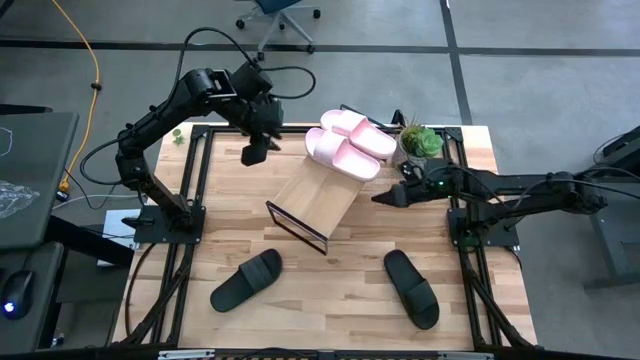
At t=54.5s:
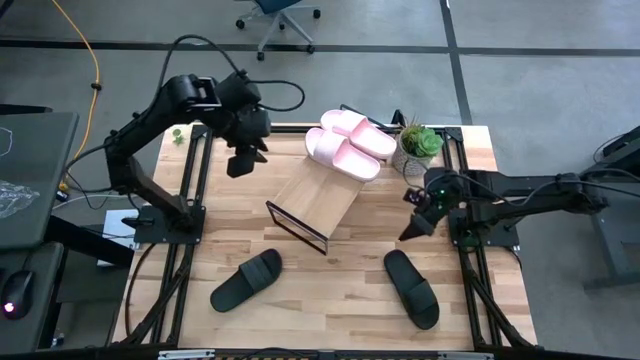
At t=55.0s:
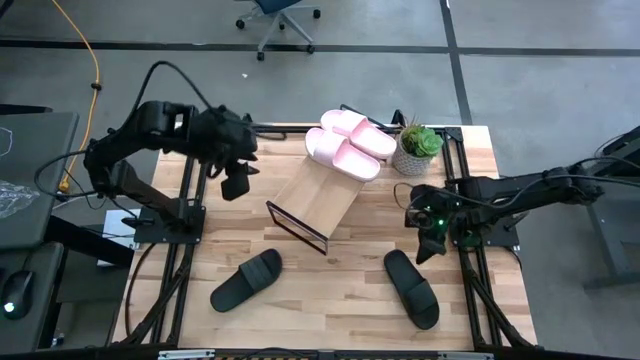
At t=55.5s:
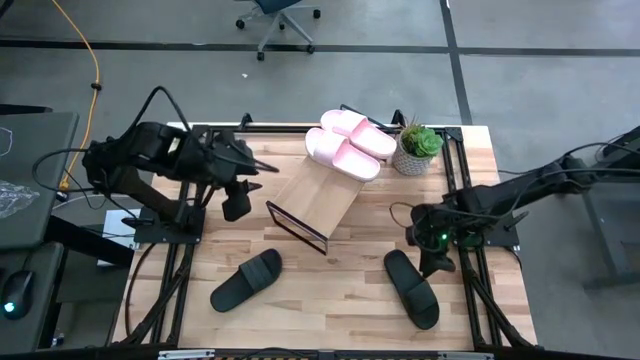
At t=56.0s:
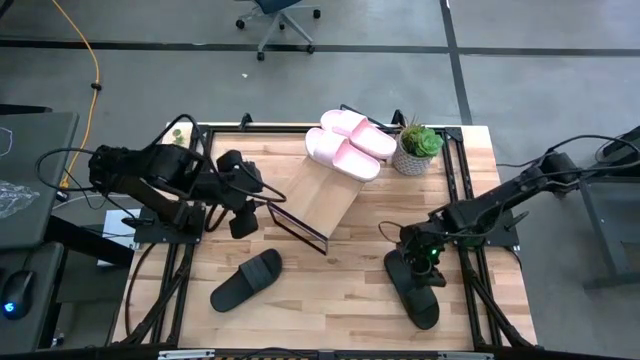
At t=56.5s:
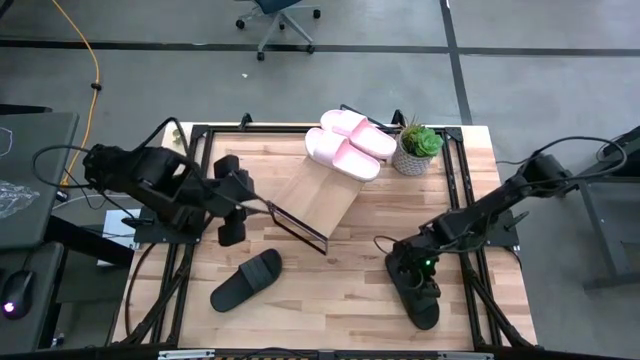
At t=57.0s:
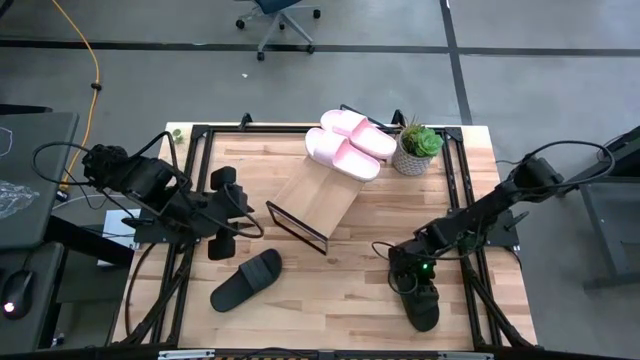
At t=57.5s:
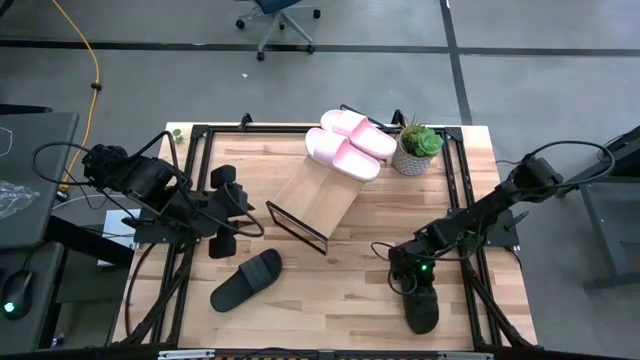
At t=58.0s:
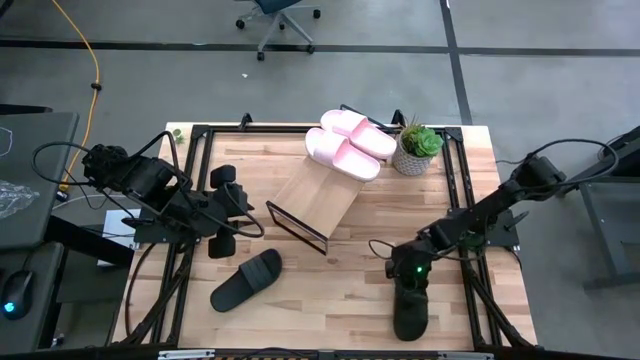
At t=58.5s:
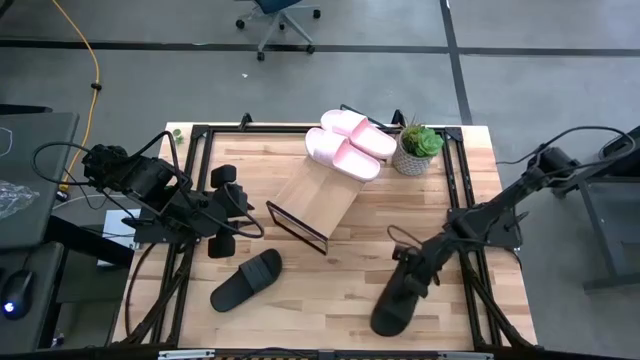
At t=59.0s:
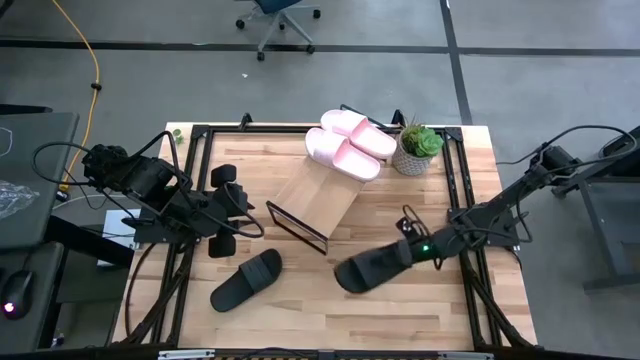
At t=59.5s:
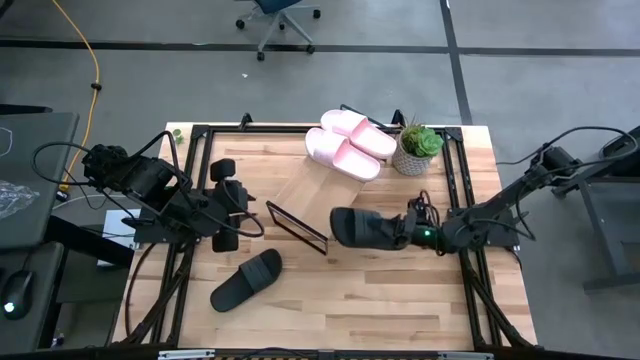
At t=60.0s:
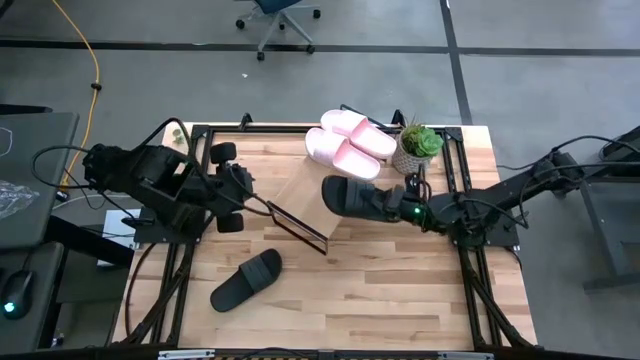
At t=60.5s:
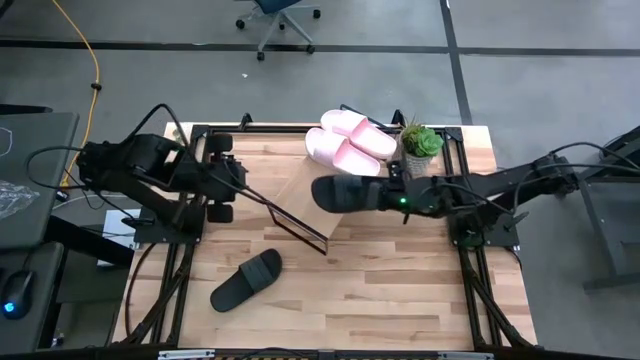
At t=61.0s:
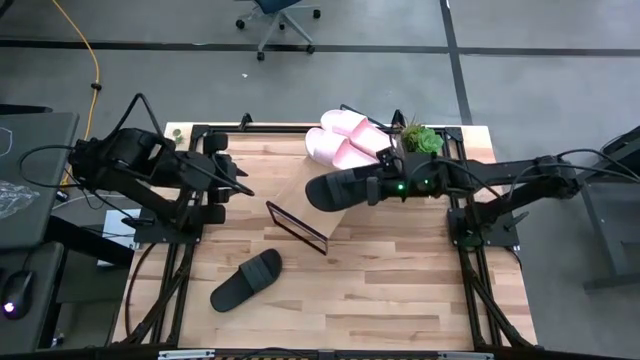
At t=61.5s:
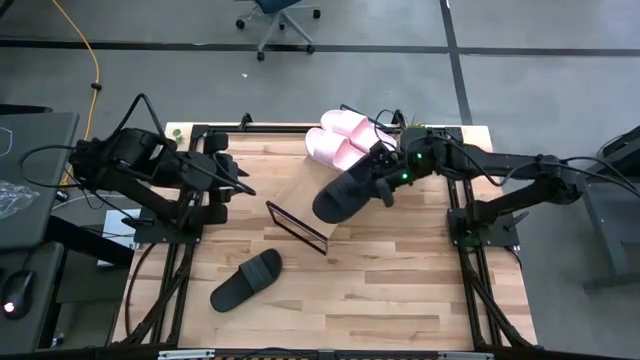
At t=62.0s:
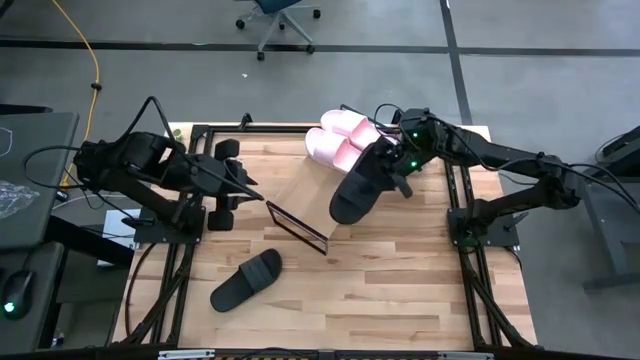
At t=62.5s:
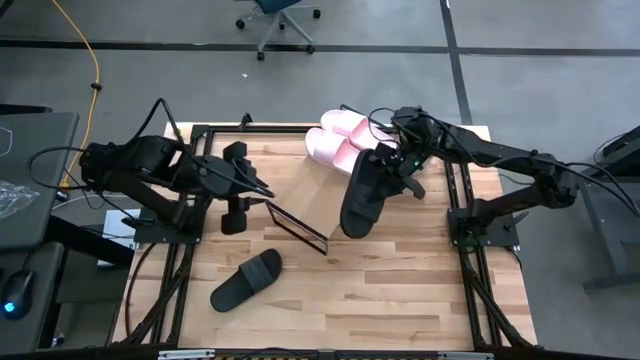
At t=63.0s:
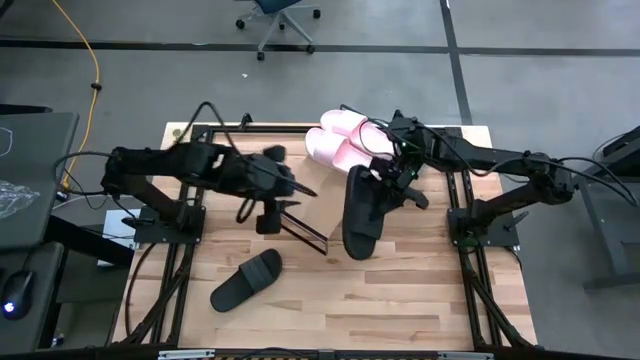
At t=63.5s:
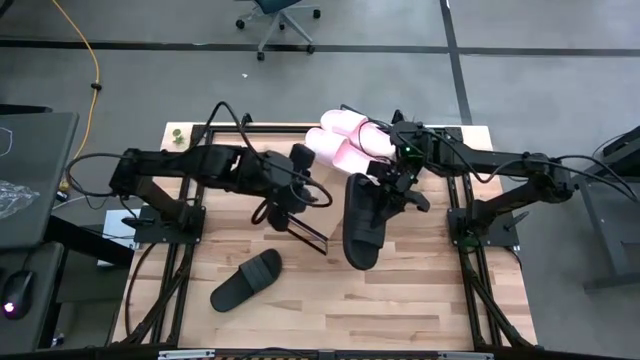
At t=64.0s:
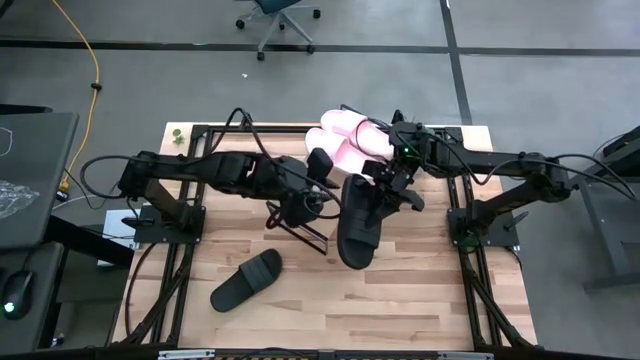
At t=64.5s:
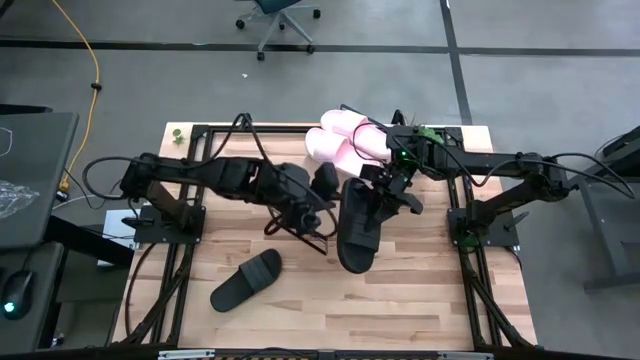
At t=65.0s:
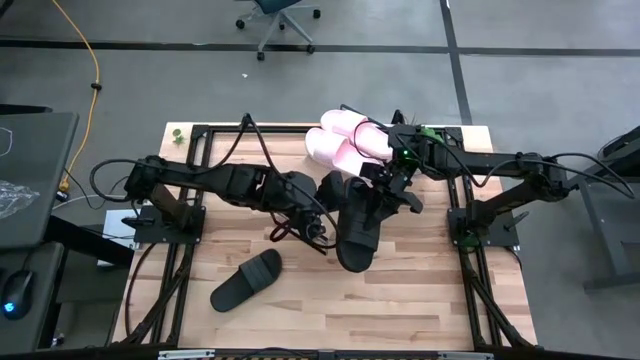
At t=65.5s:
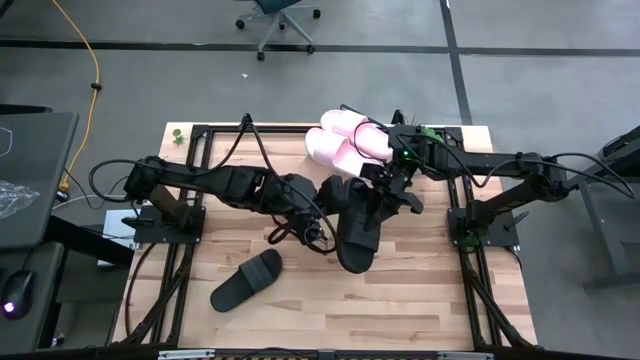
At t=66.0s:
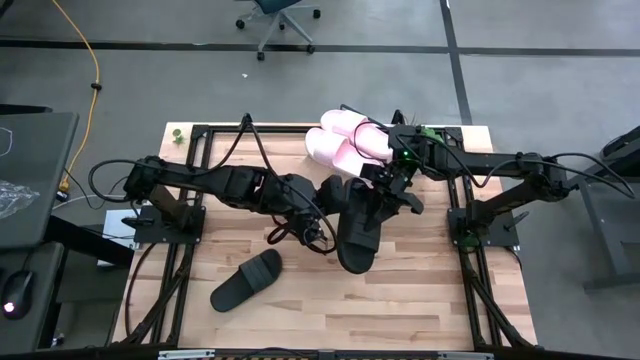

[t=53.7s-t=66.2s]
Task: Pick and place slides into the shelf
Put the right black slide on the shelf

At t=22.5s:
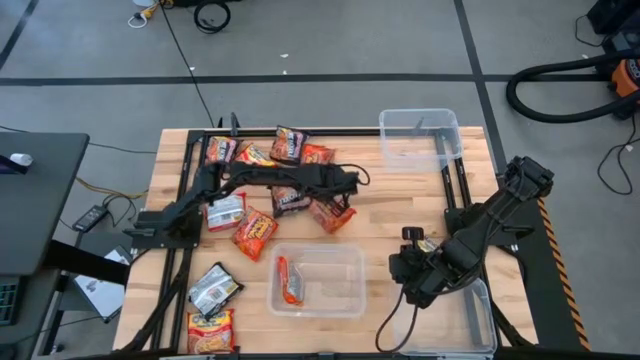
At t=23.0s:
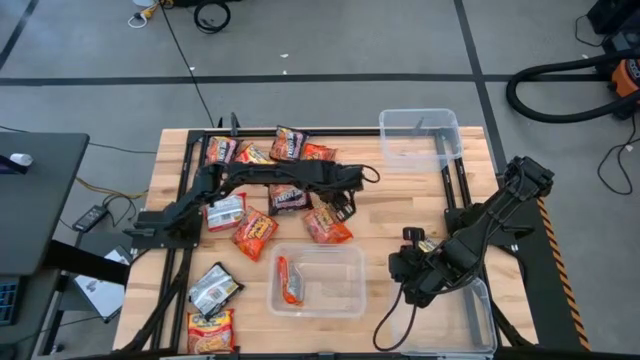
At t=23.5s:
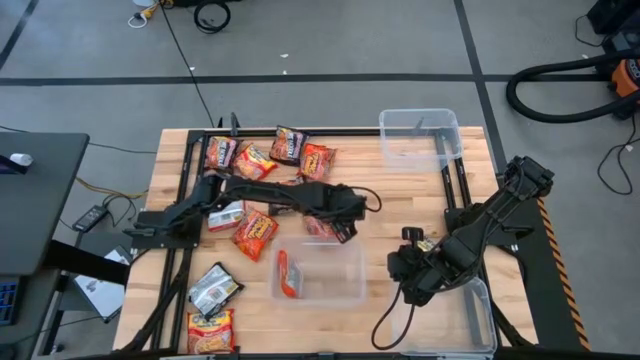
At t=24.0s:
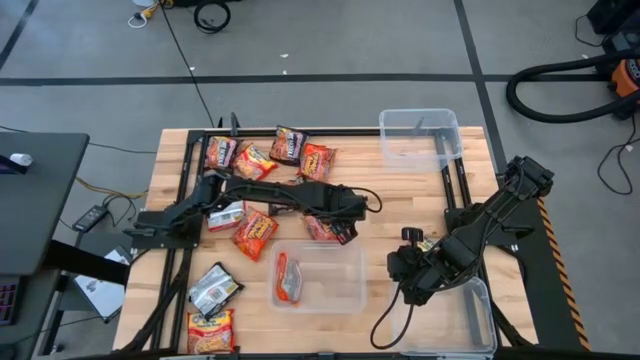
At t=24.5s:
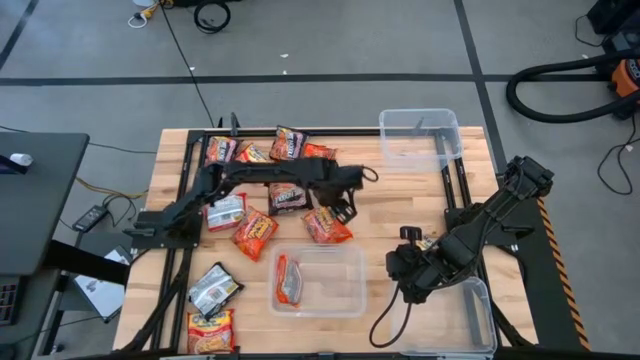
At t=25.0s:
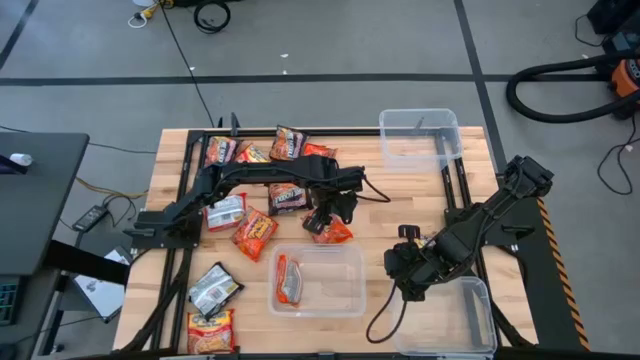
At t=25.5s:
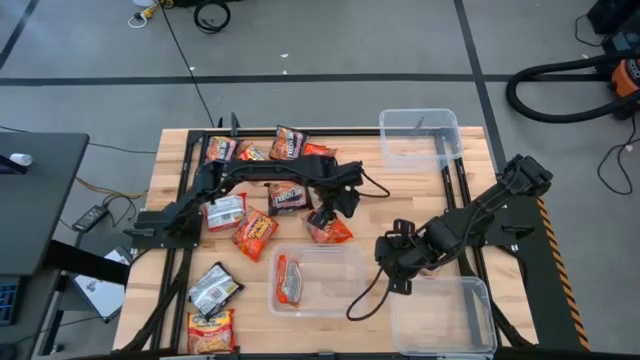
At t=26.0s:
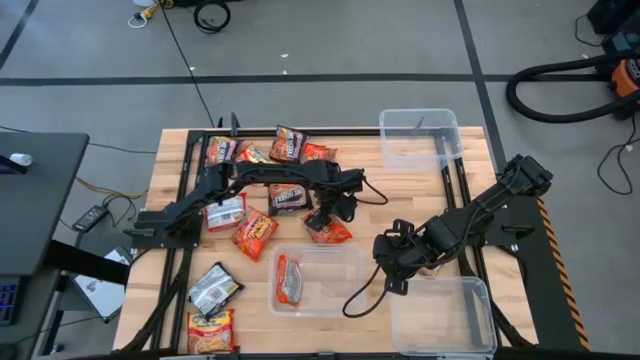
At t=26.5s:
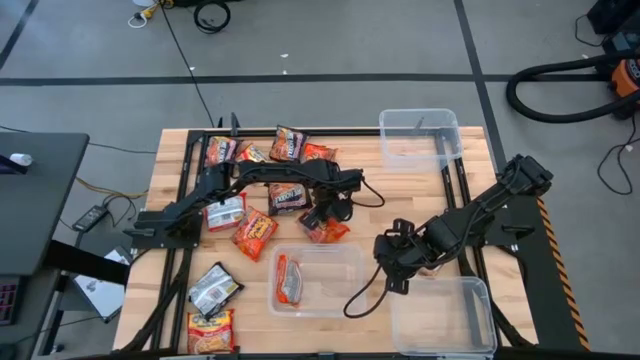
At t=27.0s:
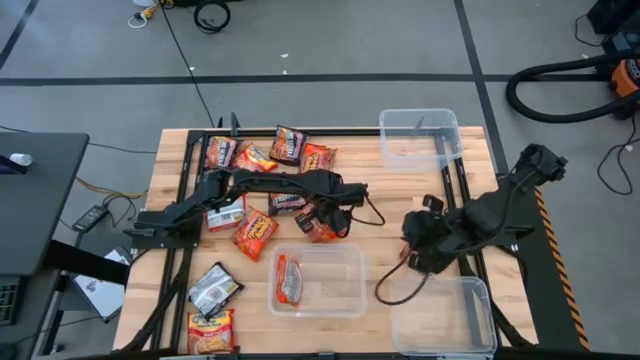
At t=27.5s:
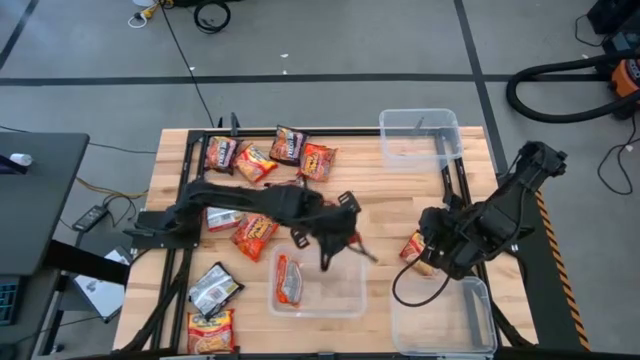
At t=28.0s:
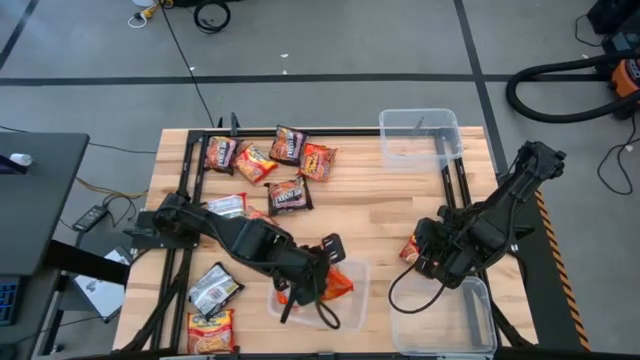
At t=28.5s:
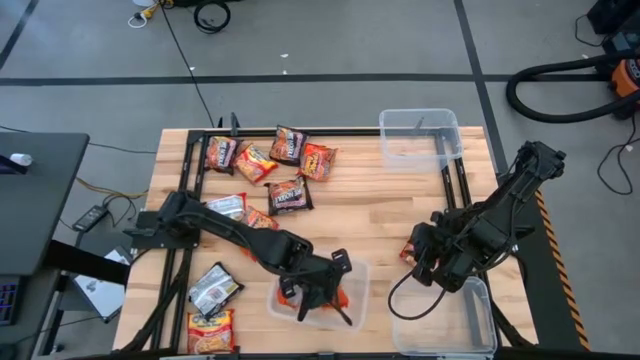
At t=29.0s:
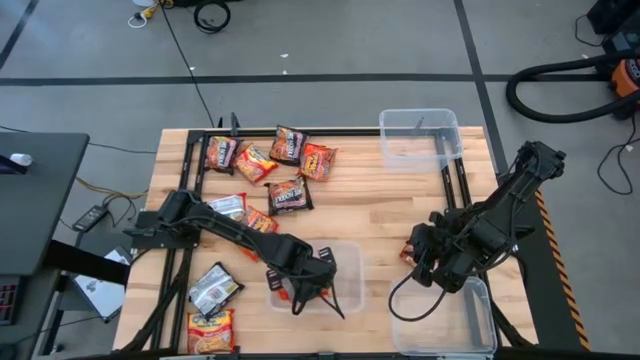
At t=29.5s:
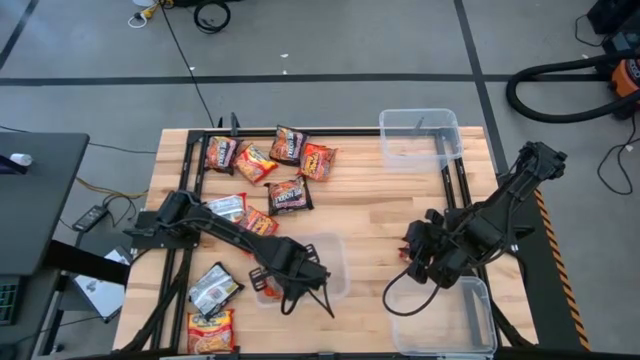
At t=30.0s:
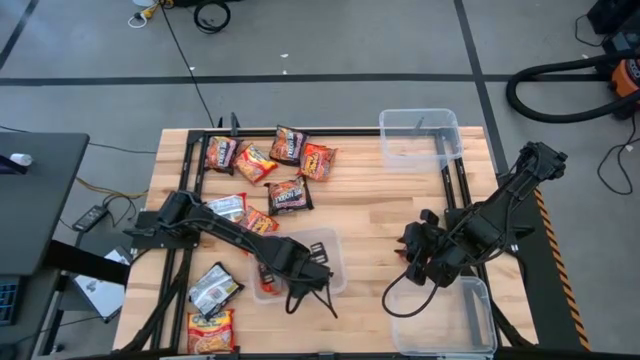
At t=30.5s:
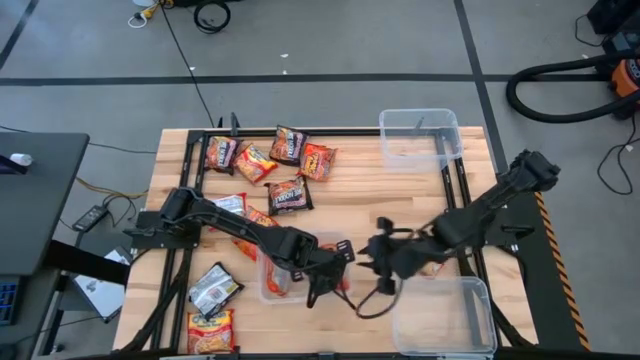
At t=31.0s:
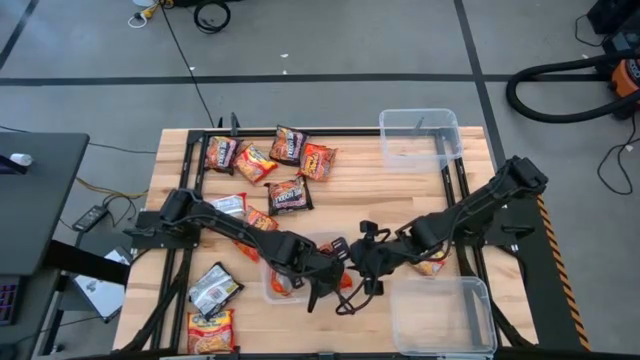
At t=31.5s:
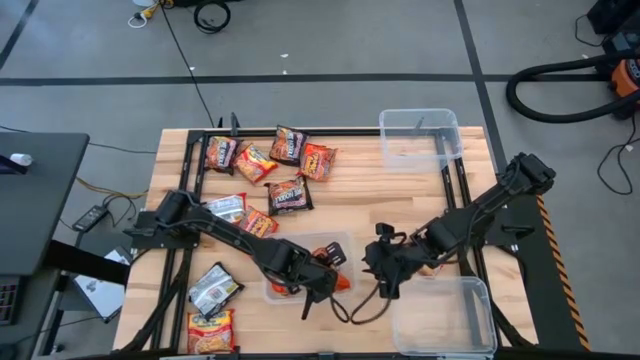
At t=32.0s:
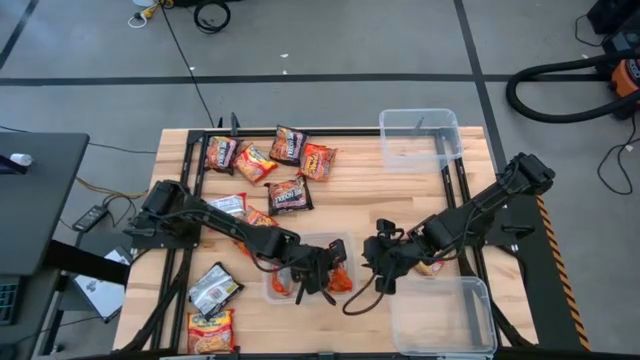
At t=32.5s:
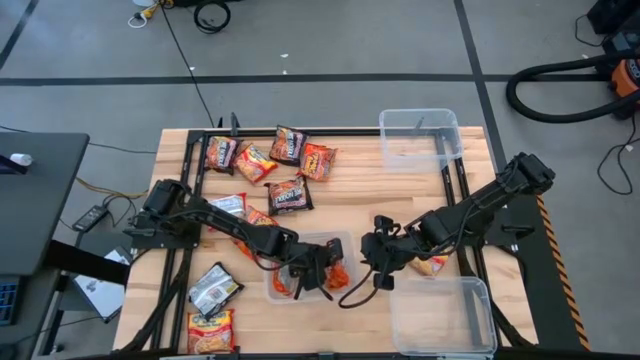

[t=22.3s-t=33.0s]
Task: Sort Maruchan noodles
Put the orange noodle pack into the bottom left transparent bin
